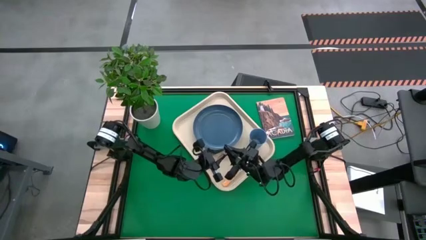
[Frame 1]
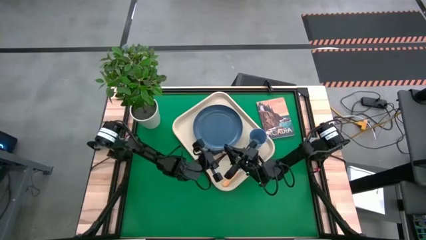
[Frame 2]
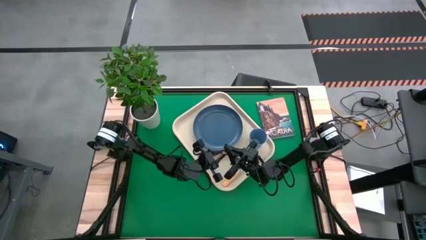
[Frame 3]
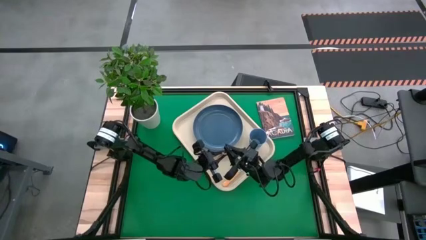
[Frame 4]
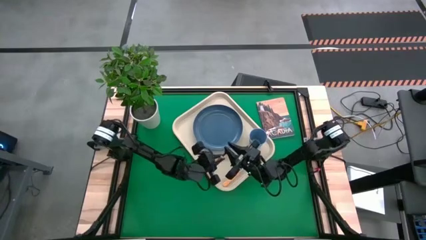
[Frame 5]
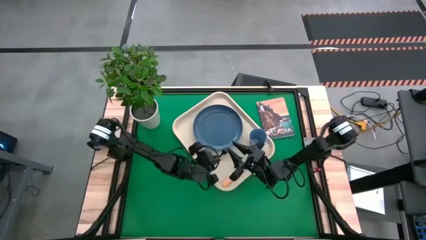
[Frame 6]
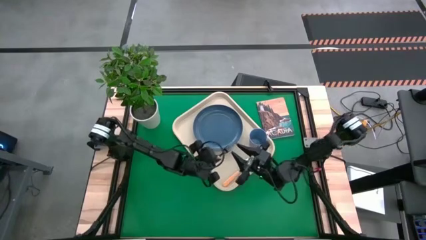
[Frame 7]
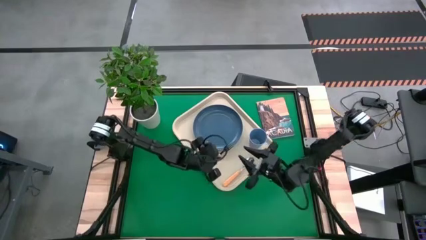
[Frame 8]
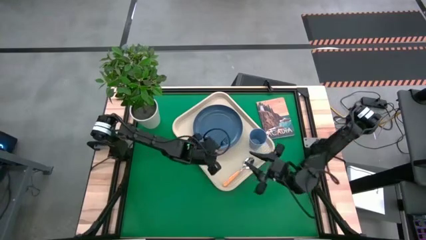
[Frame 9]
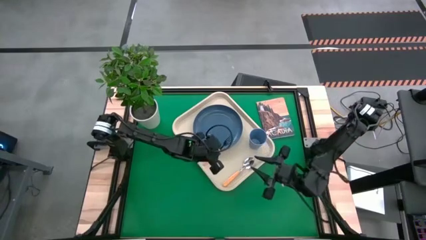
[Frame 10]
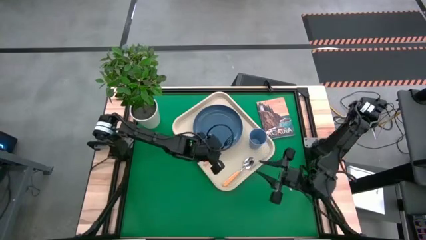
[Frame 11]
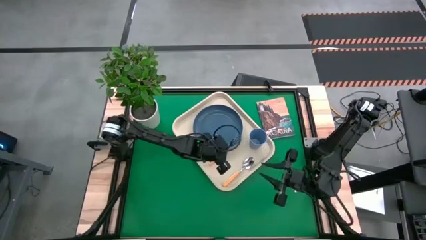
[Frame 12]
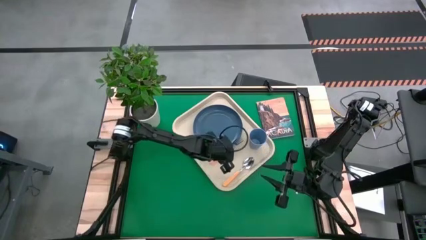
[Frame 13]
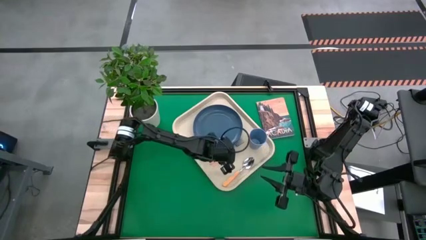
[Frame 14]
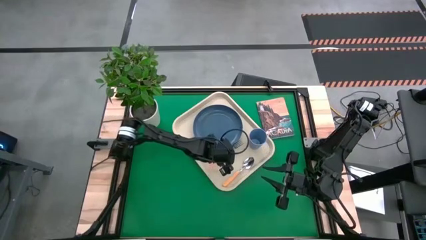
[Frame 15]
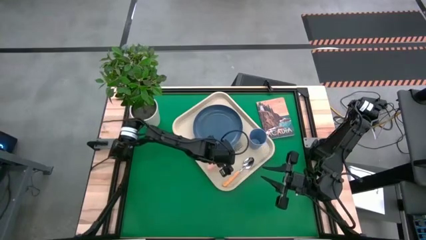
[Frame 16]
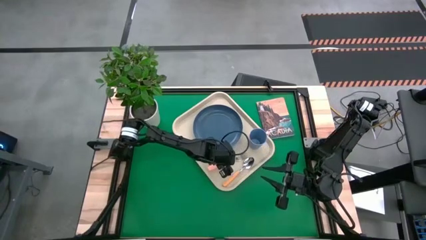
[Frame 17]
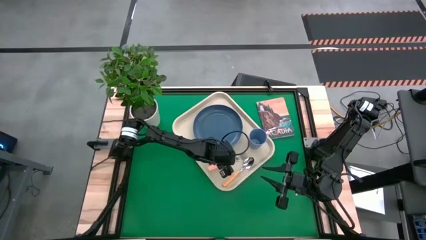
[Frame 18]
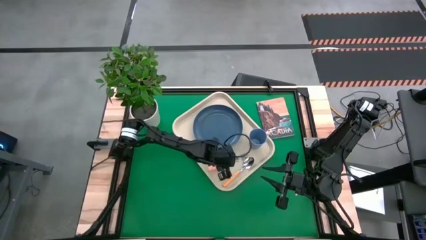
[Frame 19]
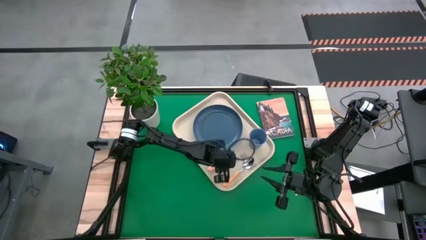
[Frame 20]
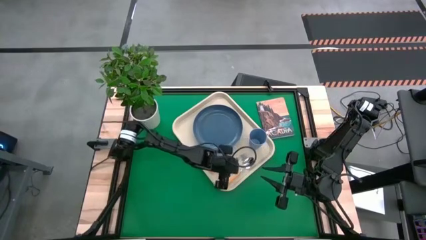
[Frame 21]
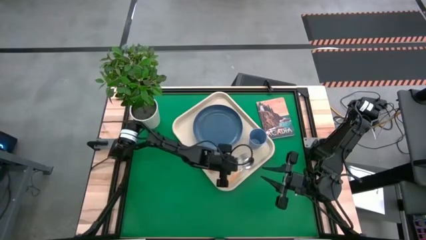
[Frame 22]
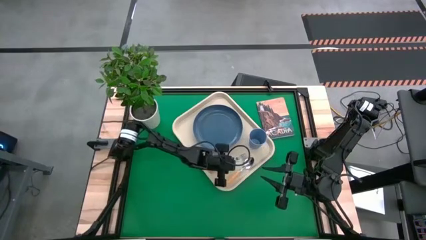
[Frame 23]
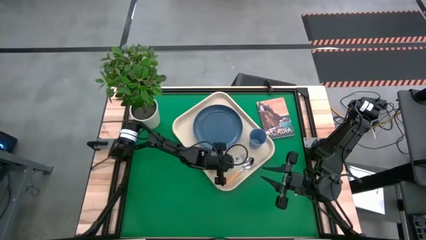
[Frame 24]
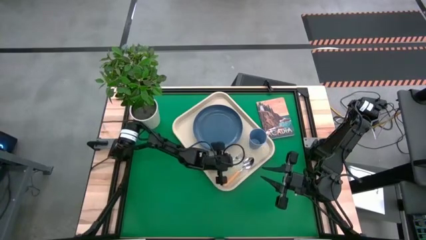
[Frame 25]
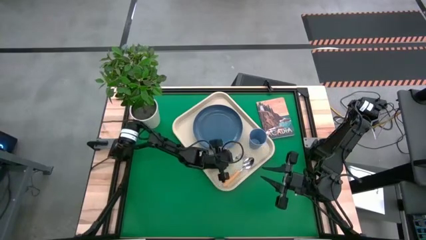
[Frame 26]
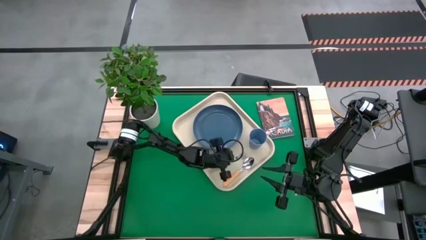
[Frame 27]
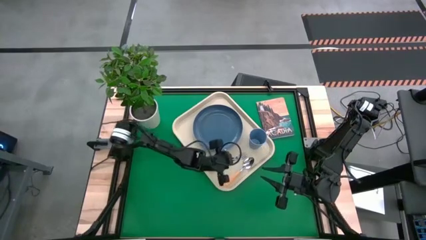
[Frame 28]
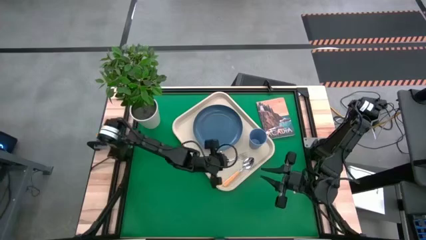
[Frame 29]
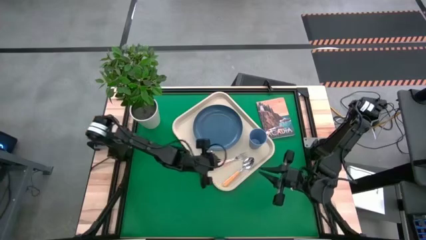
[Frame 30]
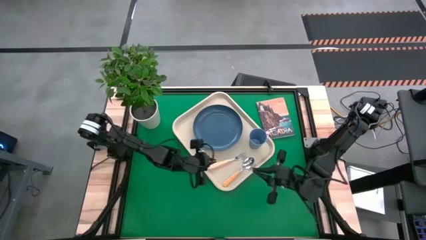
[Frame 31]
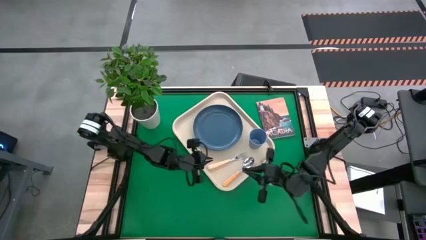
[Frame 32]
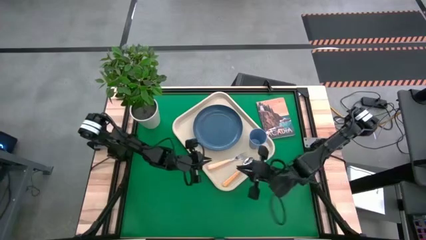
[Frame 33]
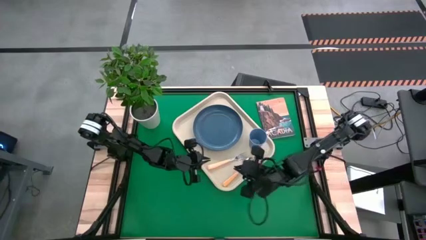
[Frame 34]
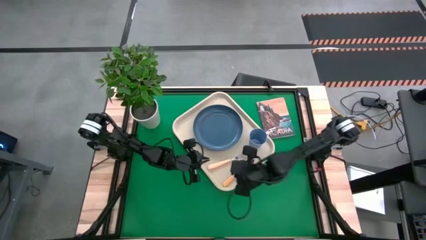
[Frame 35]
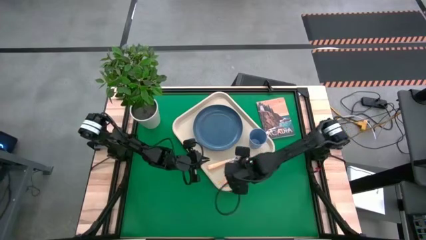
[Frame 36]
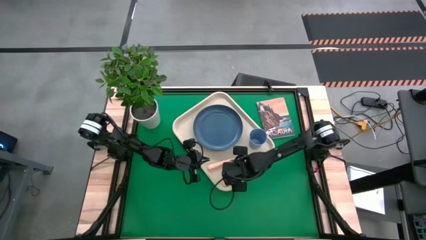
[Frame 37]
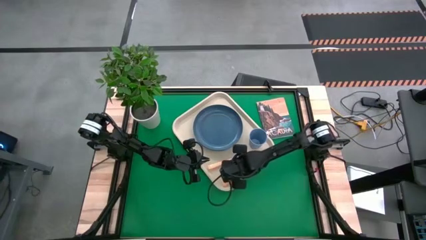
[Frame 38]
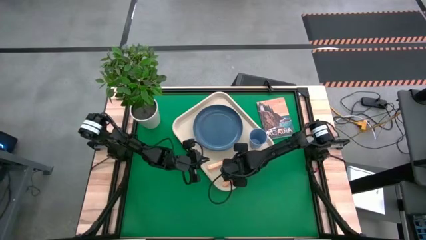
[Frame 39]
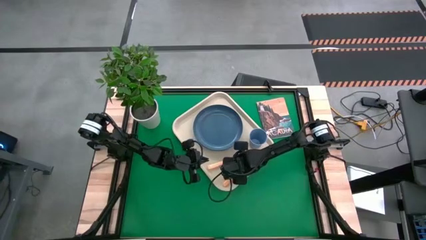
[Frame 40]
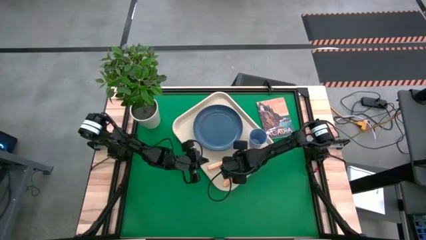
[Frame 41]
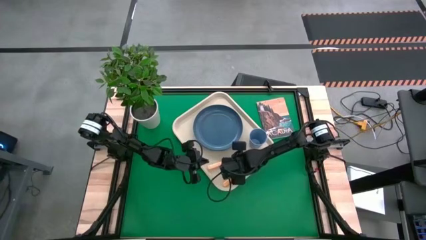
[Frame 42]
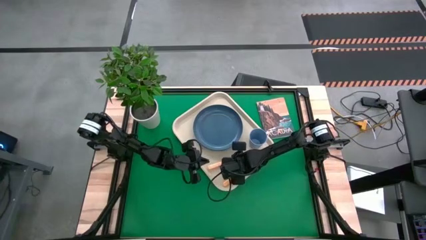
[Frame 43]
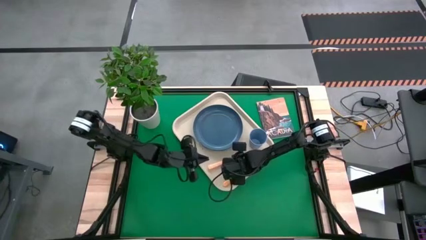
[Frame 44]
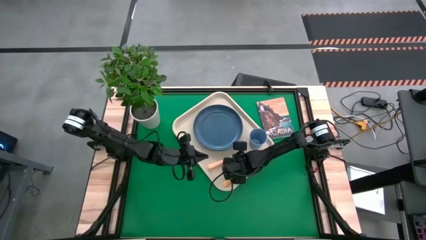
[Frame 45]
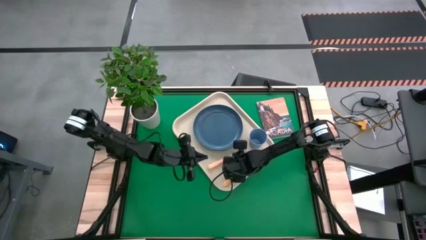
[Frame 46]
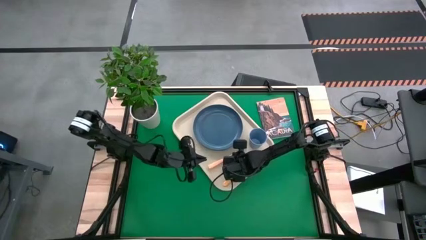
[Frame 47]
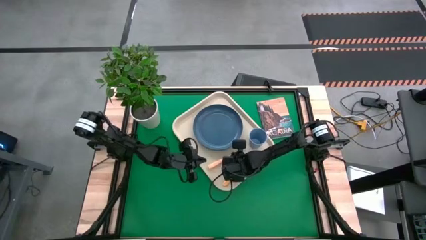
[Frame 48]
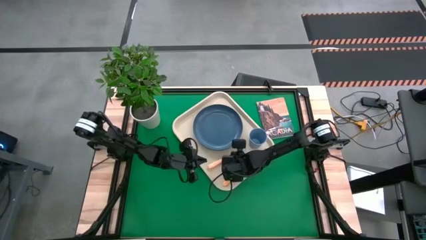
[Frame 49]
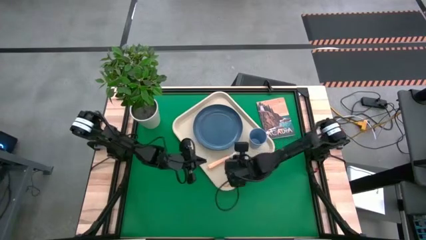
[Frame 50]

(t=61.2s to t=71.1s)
Task: Pick and place plate/cup/fork/spoon on tray
Put the fork on the white serving tray to the left side of the blue plate

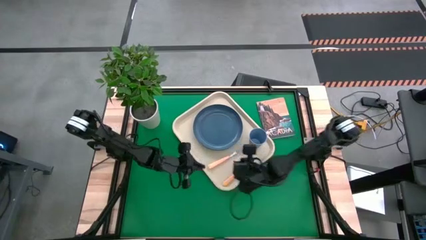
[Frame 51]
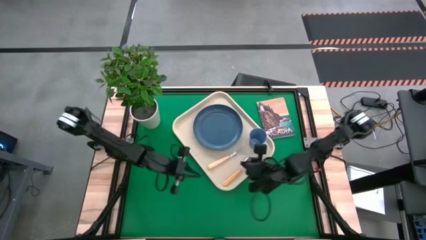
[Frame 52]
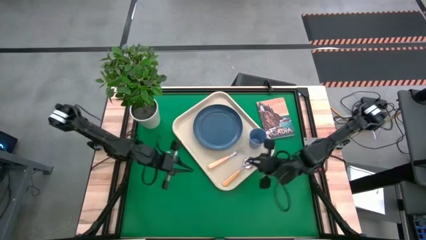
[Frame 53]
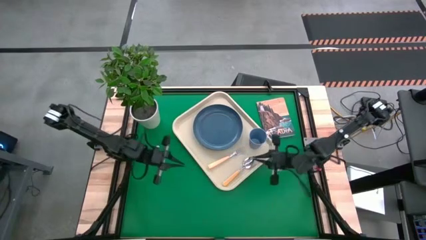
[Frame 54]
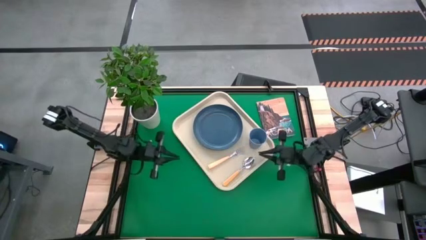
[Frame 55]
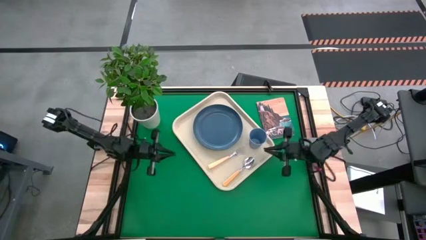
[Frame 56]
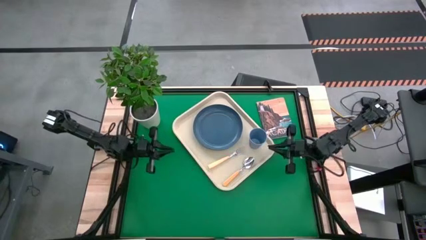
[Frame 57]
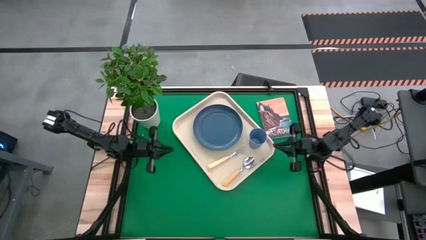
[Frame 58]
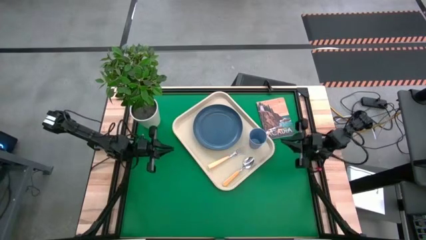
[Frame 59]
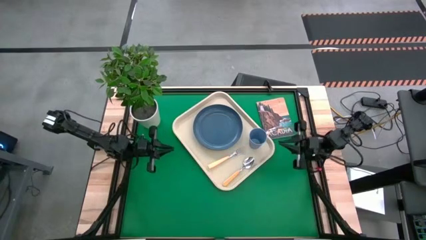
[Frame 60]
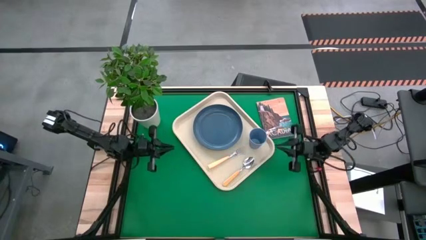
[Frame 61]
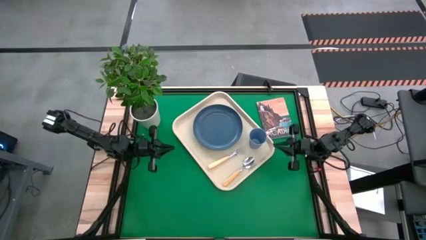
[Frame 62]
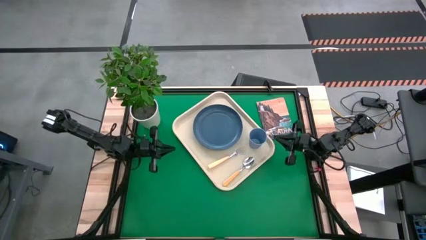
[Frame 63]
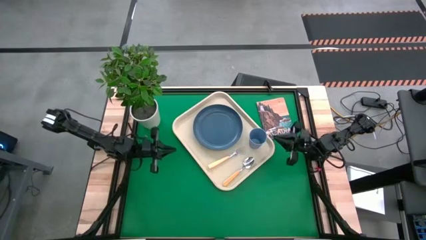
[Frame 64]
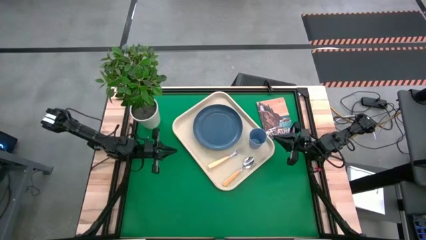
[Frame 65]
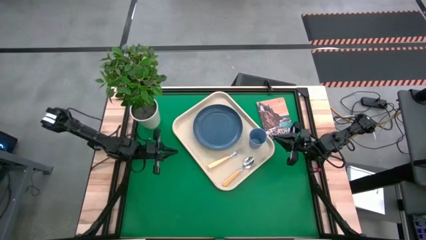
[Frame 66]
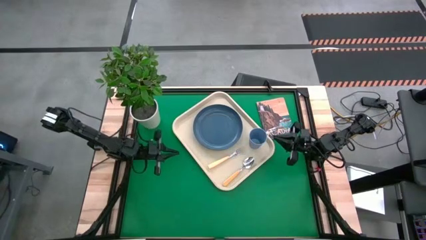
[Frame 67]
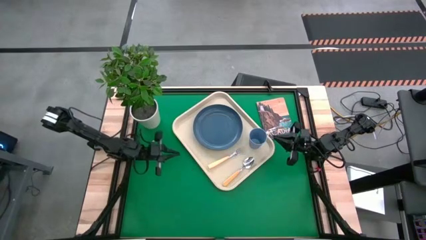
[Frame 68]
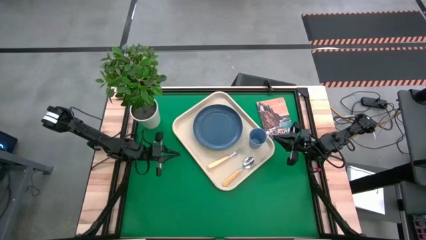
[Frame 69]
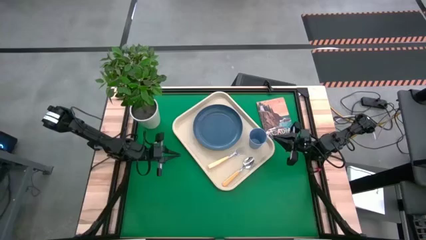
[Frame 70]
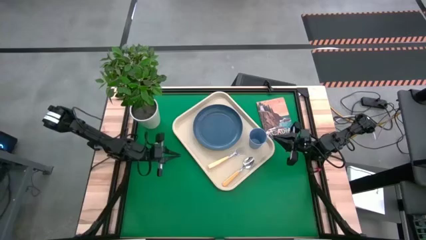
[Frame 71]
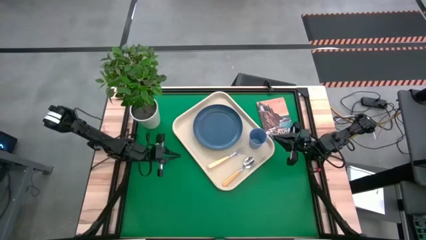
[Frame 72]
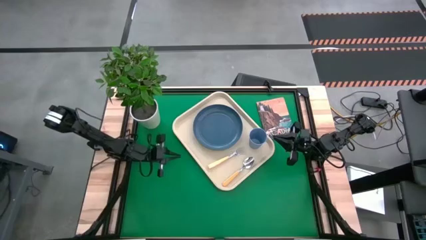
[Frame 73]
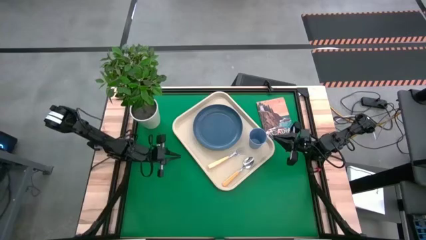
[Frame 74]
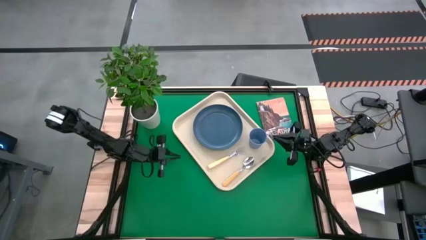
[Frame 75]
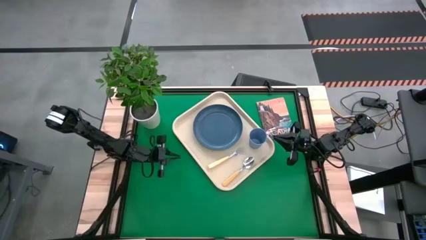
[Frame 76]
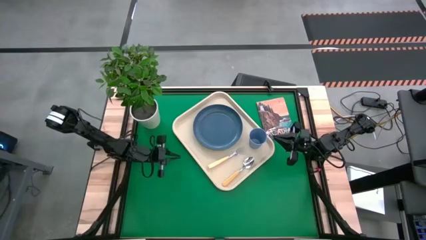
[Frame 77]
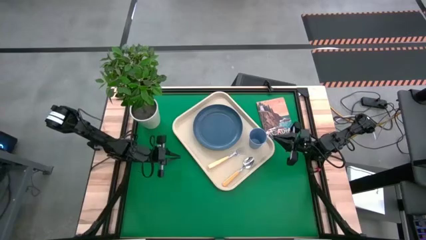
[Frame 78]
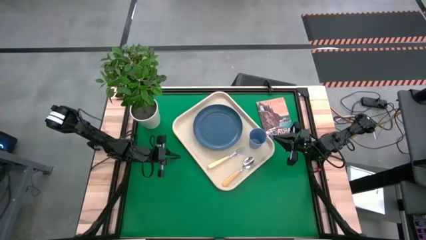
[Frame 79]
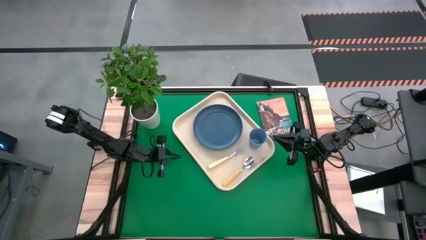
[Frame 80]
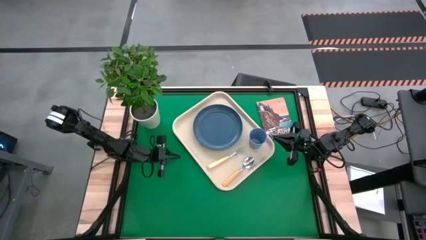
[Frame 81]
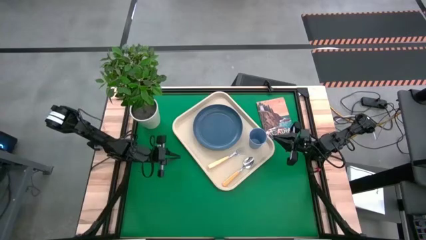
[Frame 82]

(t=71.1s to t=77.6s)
Return to Home Position
